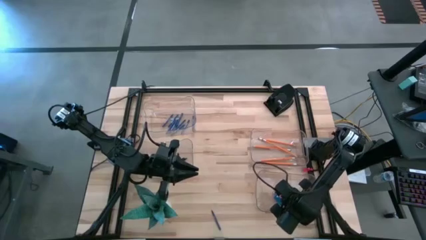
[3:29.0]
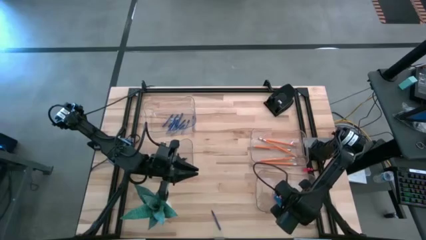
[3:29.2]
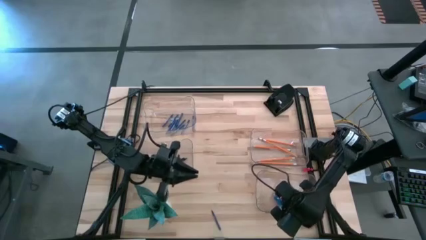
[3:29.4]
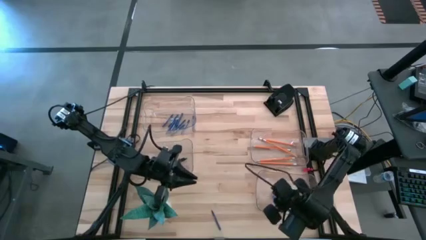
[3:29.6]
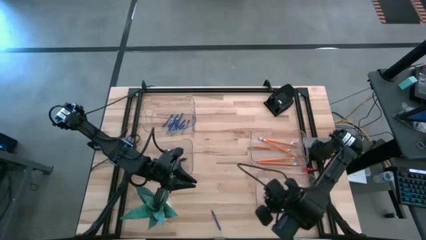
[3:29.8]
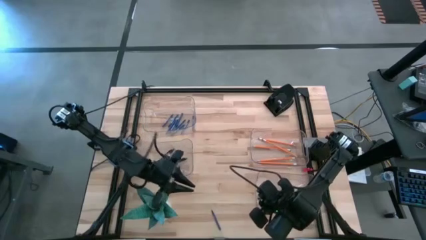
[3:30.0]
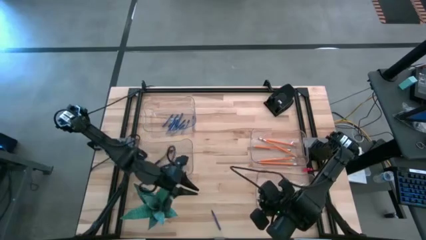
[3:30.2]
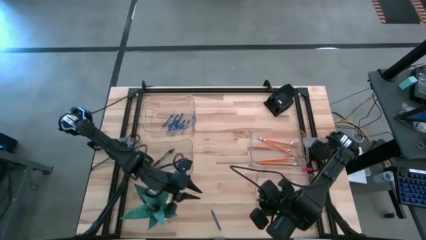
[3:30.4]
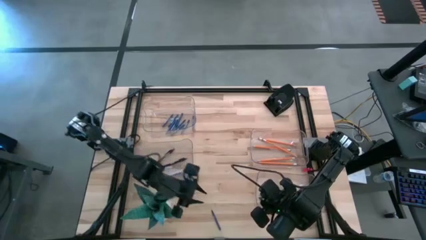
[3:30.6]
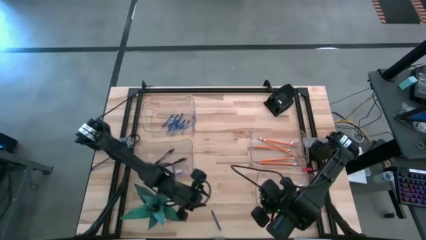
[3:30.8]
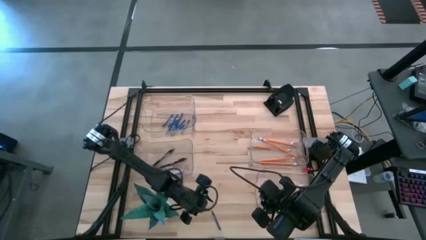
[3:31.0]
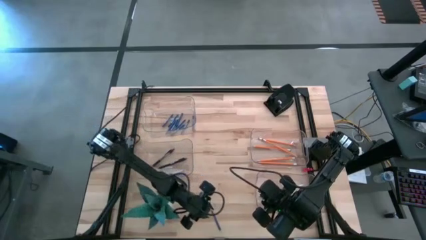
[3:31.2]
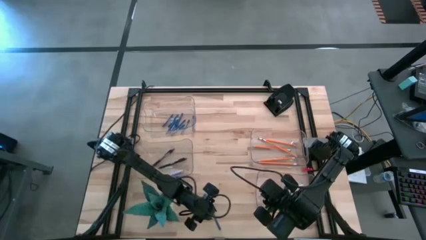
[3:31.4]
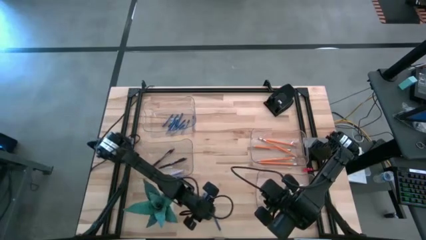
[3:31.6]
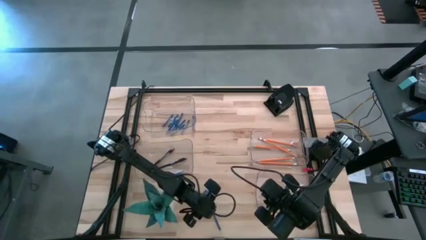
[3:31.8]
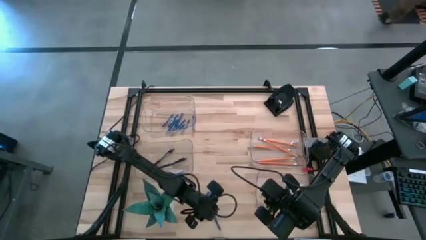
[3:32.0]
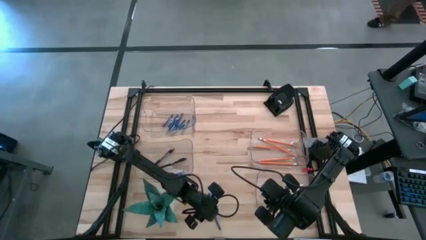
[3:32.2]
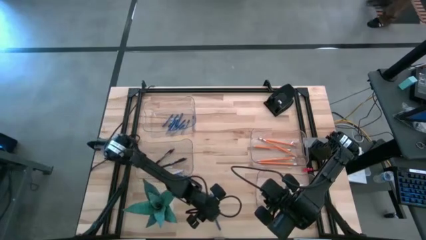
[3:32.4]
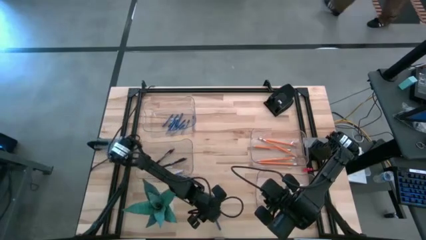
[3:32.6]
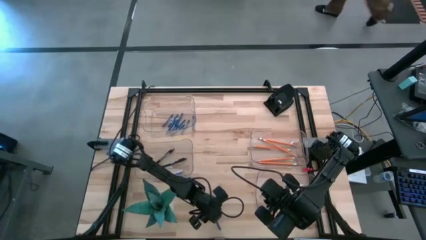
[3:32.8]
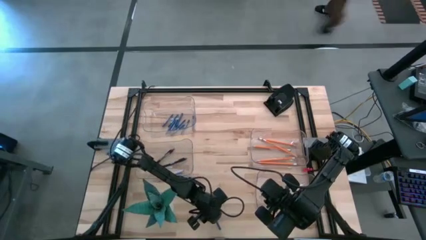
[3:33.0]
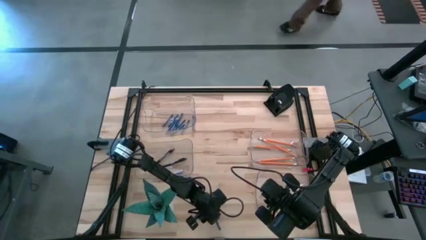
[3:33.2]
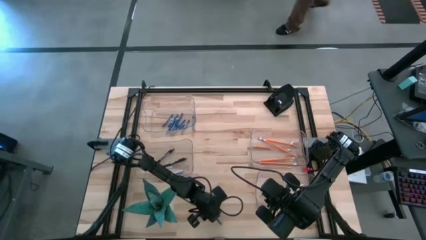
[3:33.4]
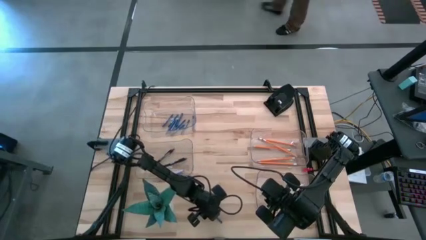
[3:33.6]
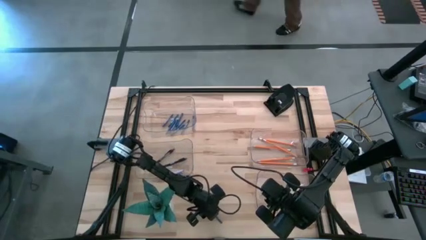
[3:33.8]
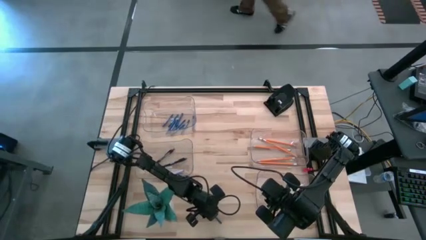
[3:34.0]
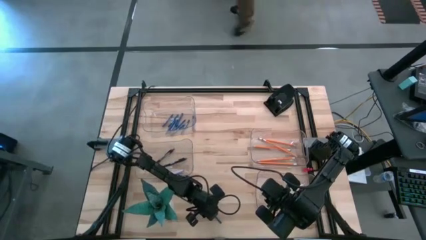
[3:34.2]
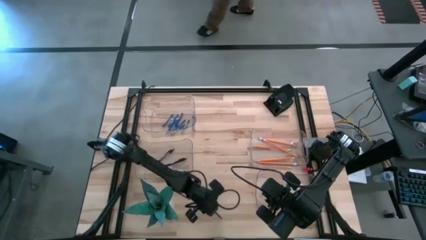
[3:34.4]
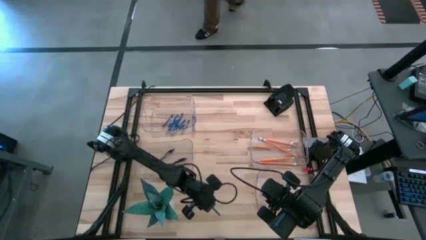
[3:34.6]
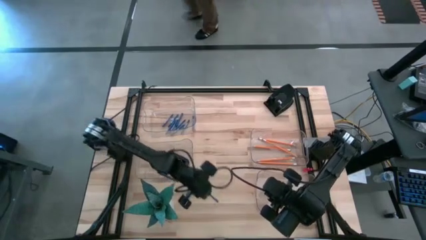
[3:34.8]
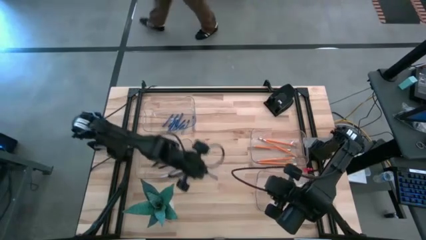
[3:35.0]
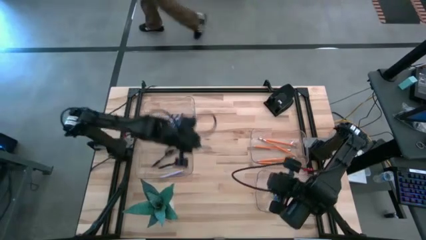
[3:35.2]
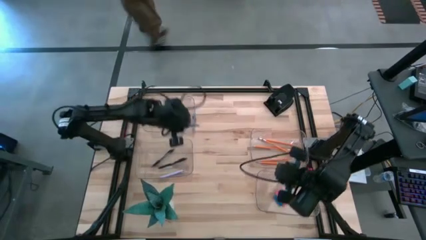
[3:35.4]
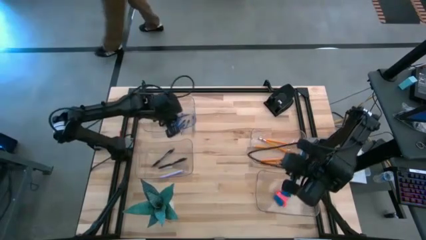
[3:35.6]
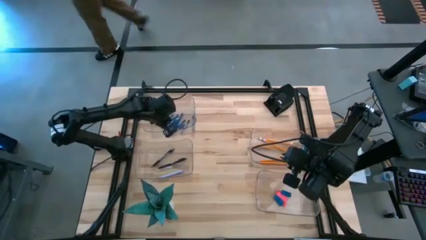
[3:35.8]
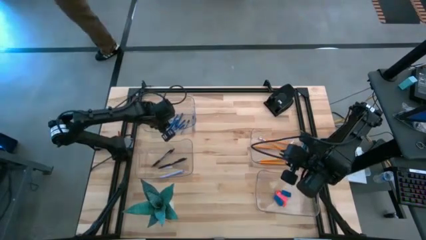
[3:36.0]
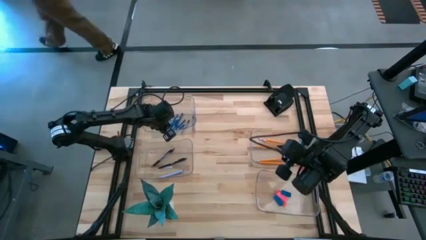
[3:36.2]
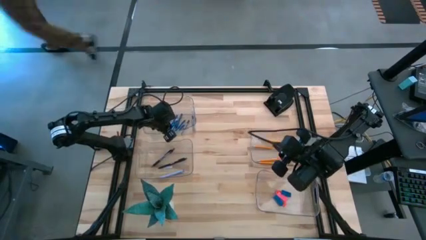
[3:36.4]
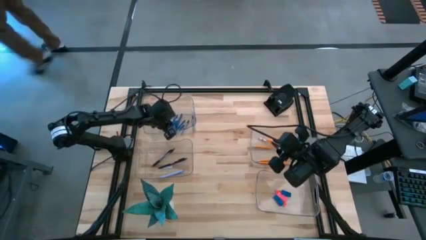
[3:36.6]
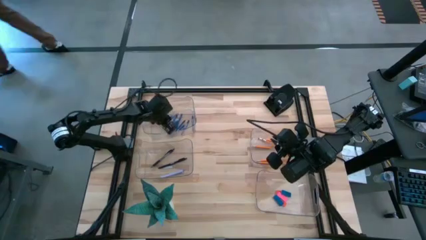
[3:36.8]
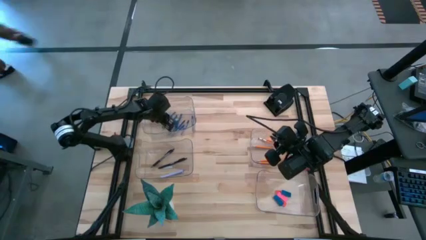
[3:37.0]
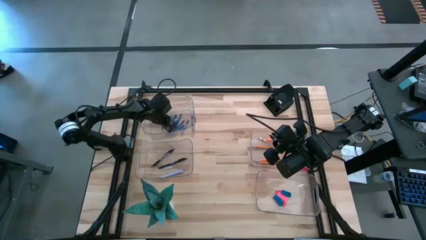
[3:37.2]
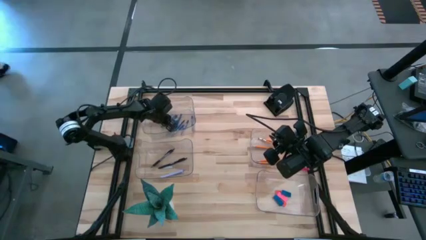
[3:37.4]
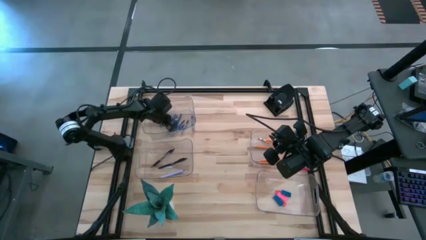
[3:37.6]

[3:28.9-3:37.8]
Task: Sort crayons/erasers/pens/pencils in bins
Put the blue crayon into the top transparent bin

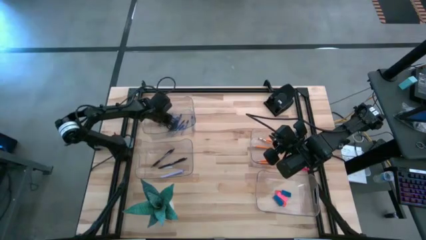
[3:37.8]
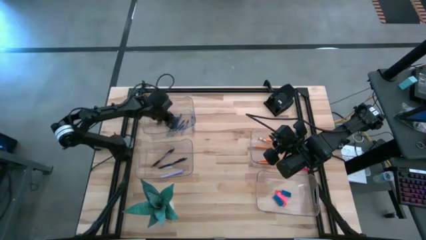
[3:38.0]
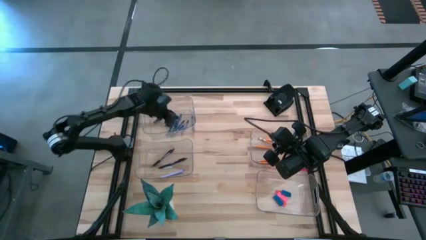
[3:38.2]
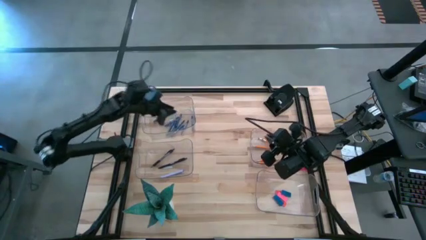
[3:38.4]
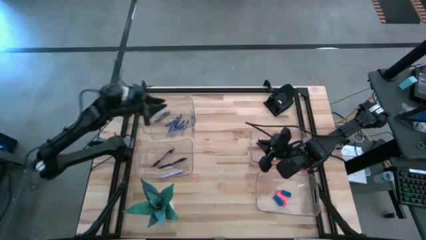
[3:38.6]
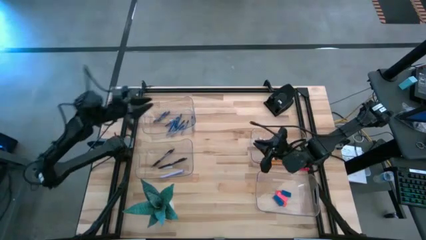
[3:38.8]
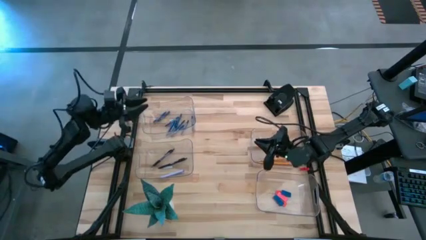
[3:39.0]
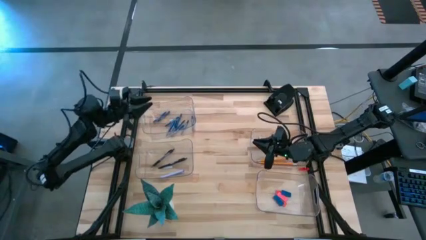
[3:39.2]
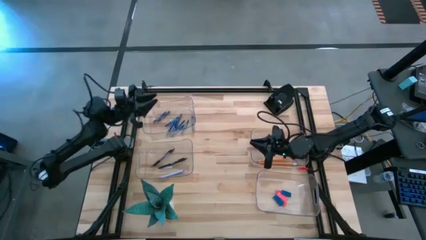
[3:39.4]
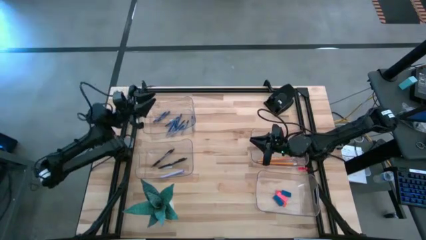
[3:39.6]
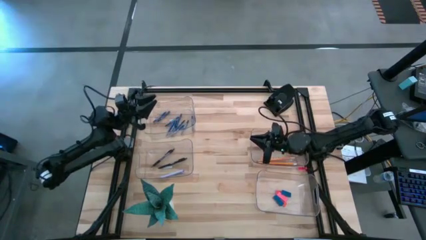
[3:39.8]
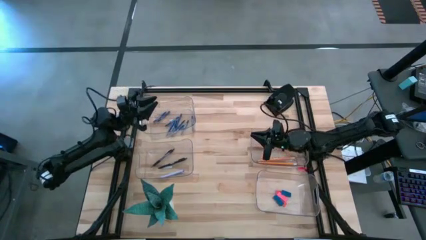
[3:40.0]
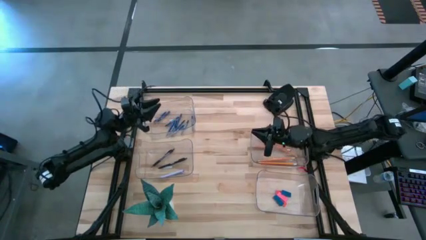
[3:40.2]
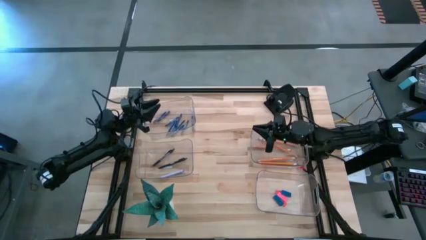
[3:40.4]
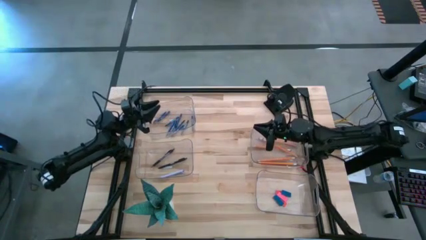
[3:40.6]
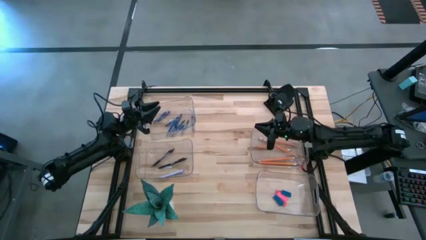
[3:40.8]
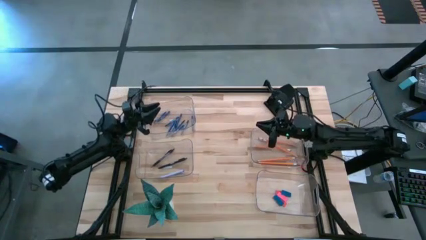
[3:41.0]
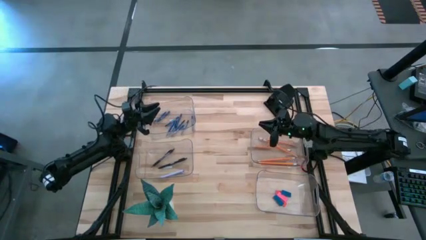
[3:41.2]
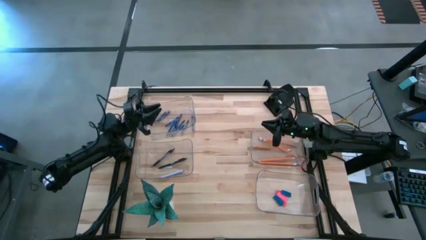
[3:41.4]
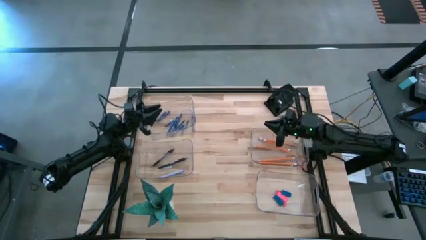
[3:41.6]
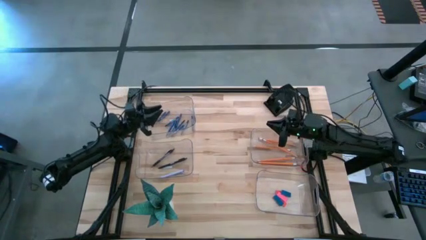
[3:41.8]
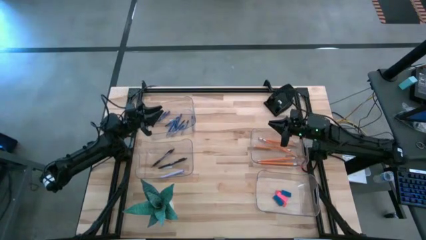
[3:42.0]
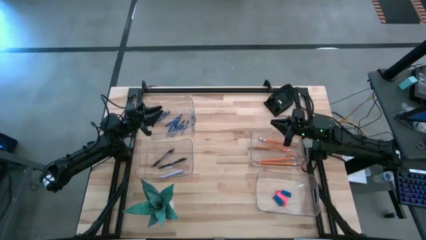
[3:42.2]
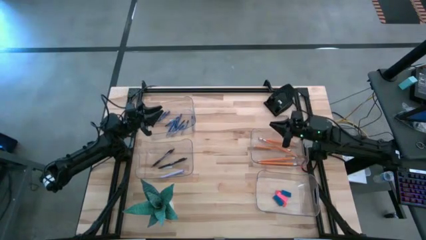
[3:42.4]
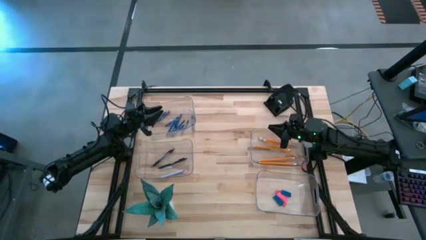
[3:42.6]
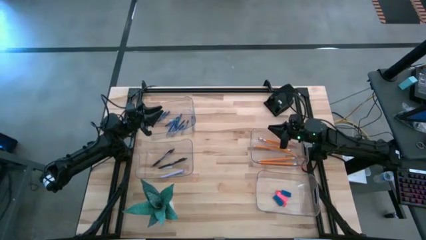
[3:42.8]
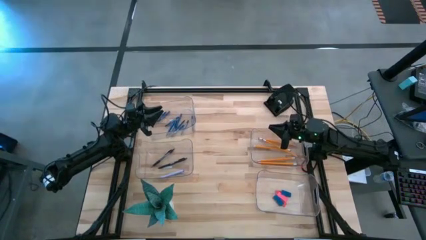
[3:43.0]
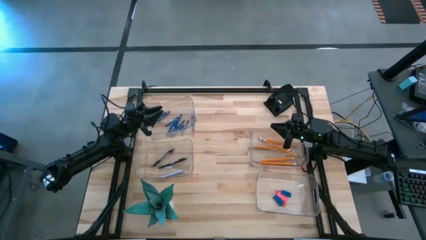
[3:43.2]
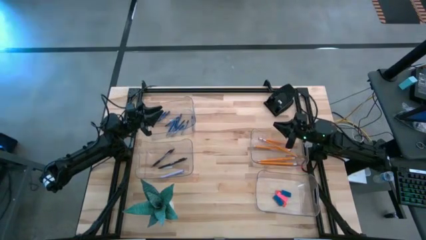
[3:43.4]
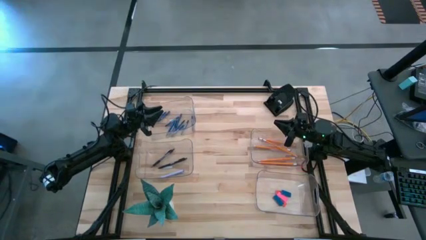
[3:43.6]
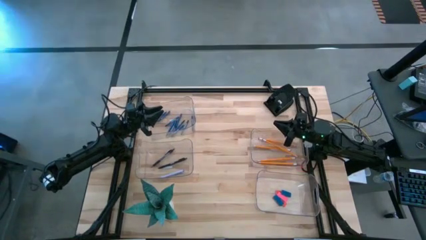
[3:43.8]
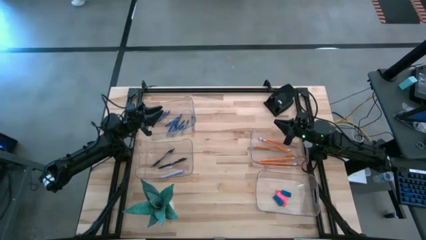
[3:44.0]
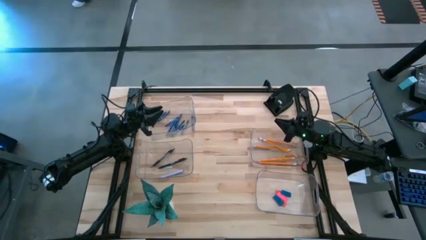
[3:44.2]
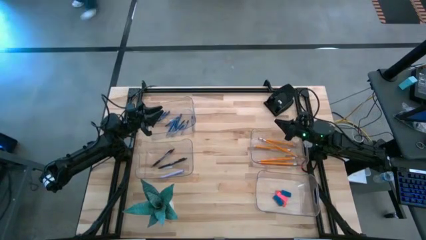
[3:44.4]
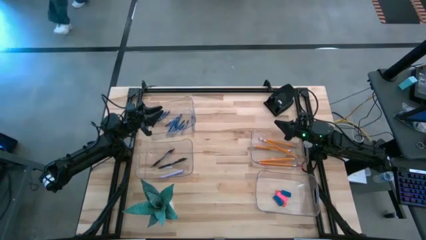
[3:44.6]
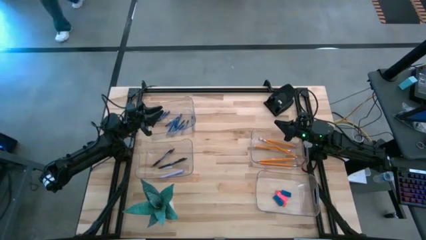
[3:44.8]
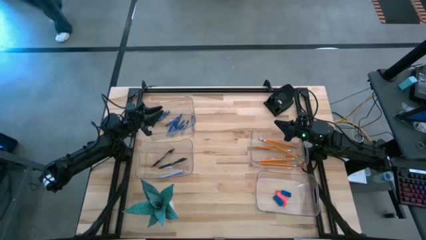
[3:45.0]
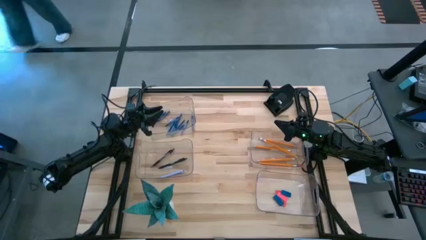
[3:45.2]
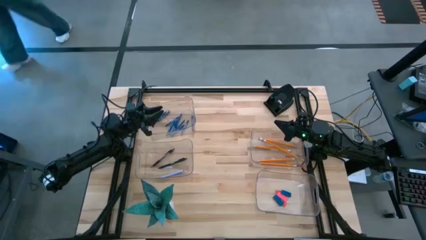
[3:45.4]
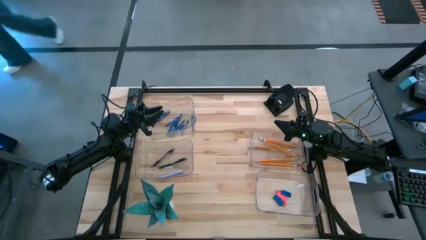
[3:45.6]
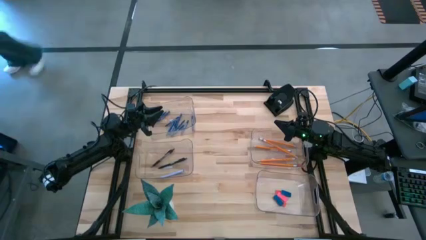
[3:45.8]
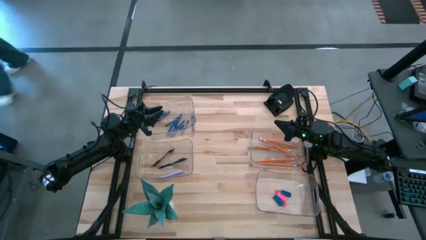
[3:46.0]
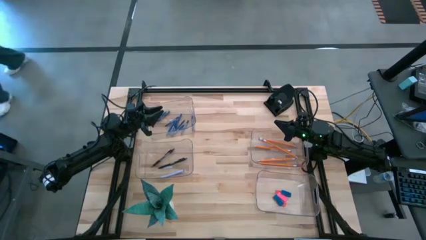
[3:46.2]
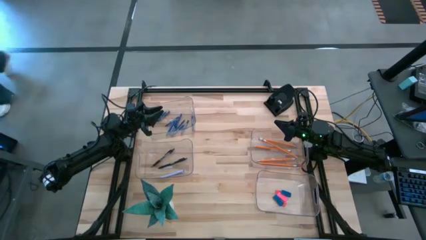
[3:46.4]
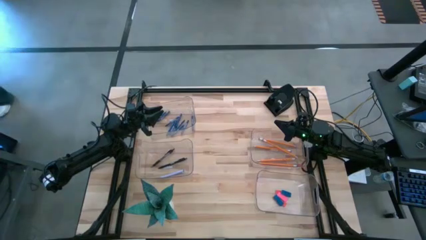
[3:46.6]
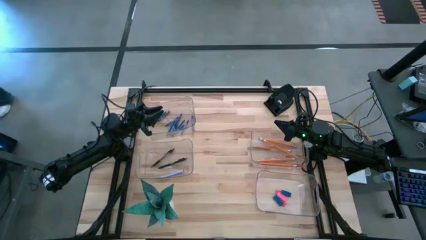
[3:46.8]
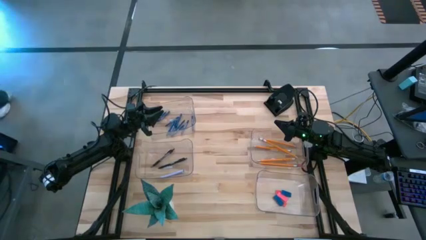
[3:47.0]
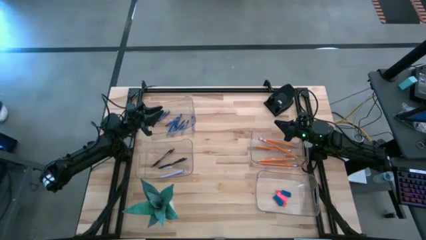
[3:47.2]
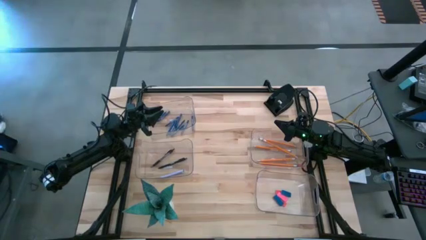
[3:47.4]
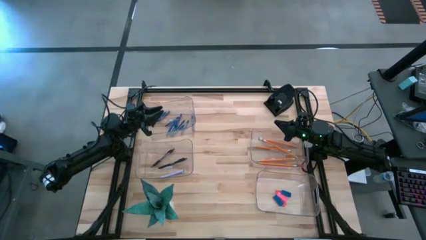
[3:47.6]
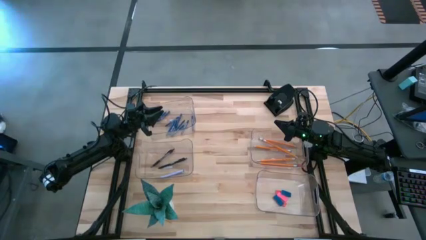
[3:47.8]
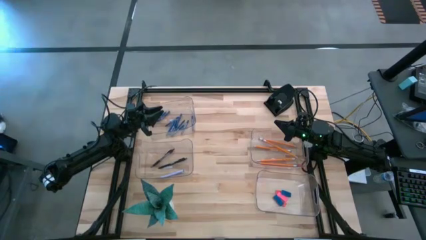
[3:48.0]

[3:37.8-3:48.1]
Return to Home Position
